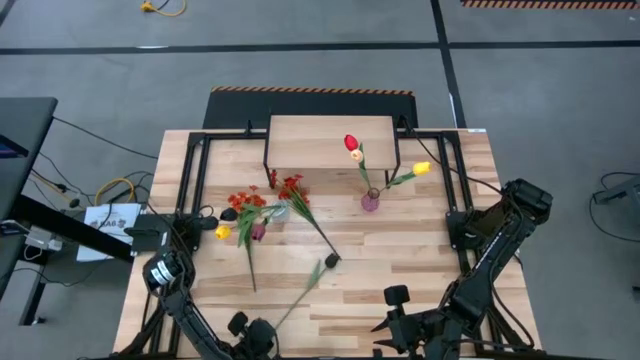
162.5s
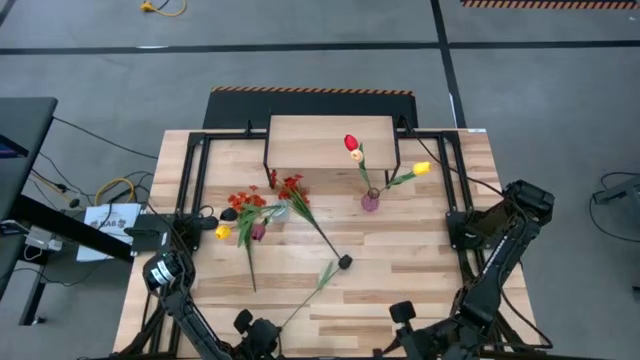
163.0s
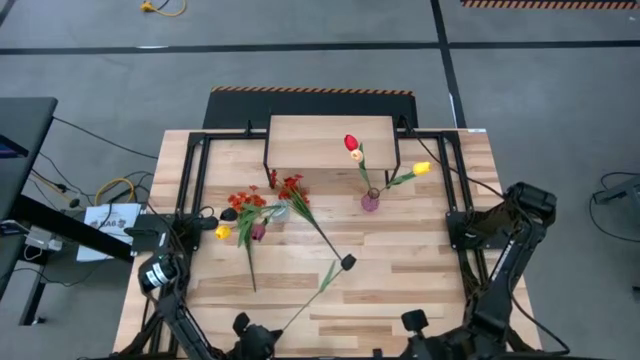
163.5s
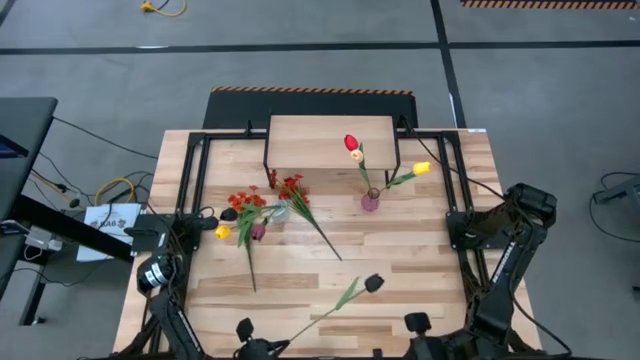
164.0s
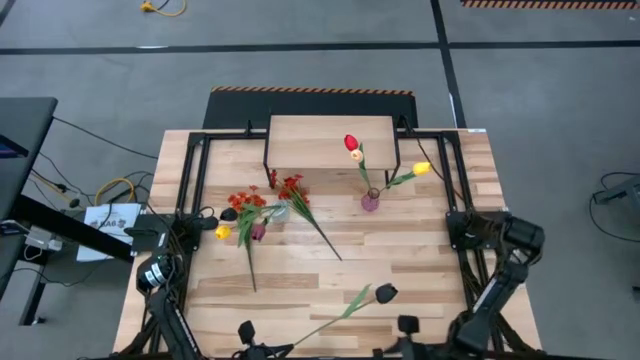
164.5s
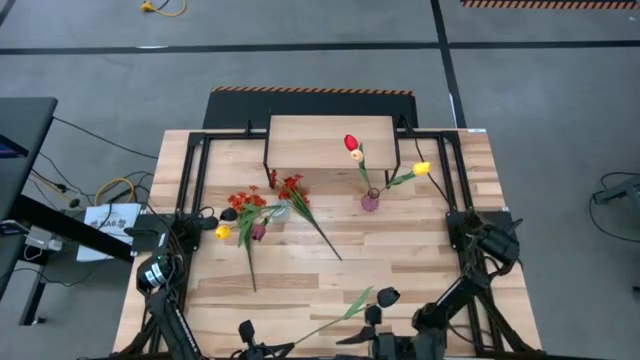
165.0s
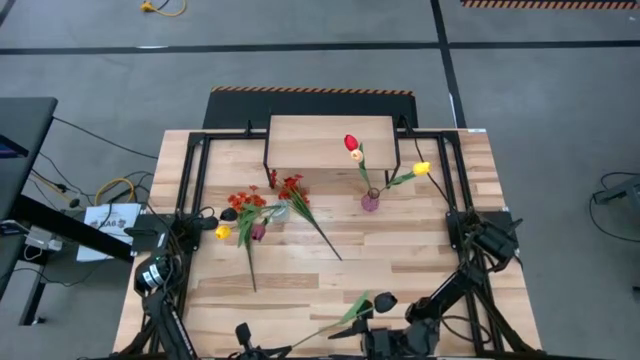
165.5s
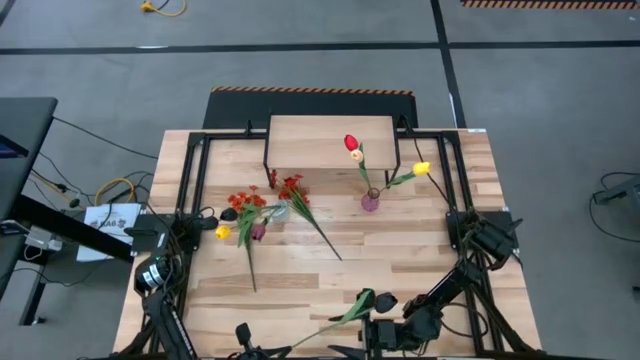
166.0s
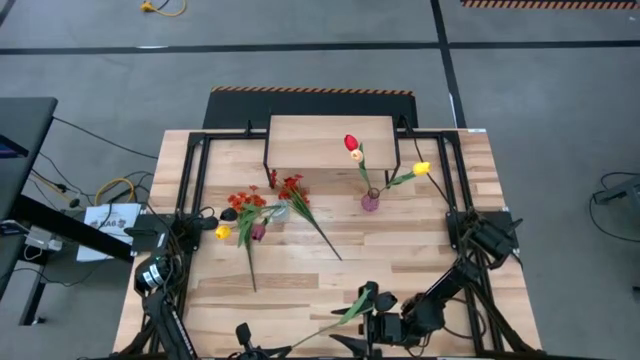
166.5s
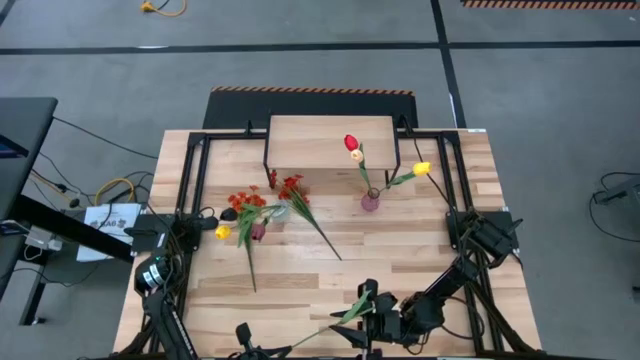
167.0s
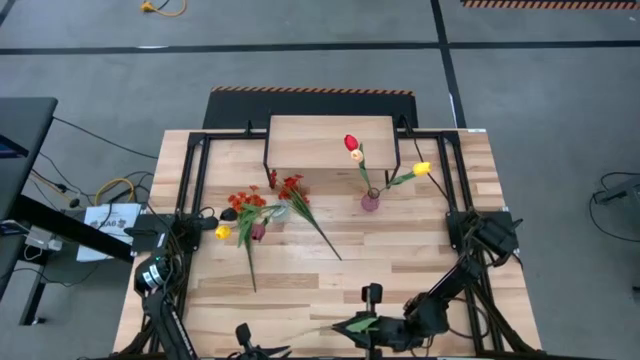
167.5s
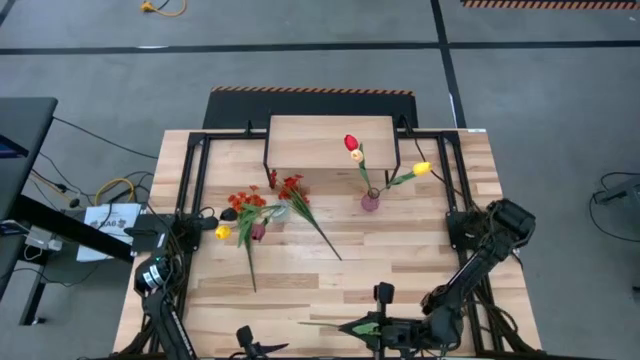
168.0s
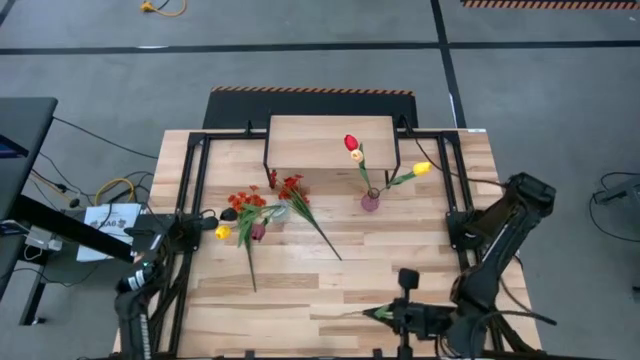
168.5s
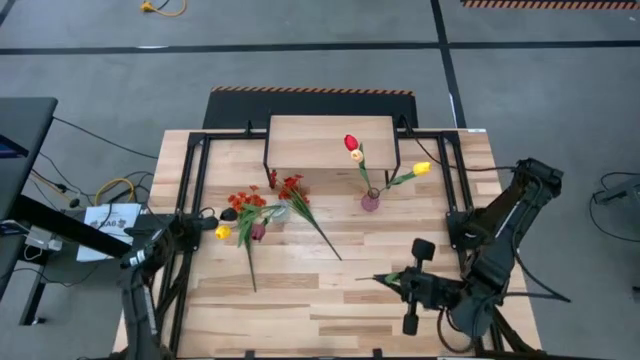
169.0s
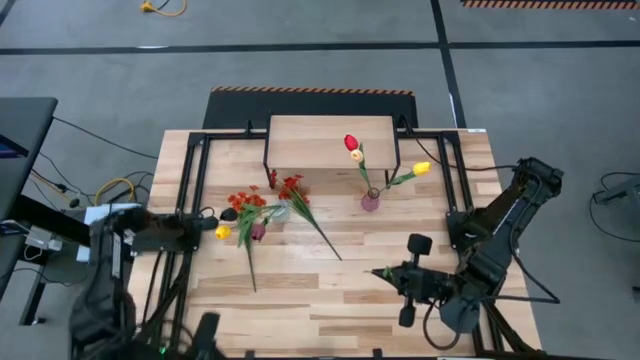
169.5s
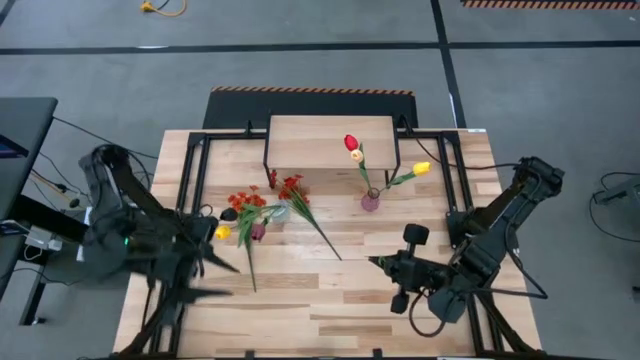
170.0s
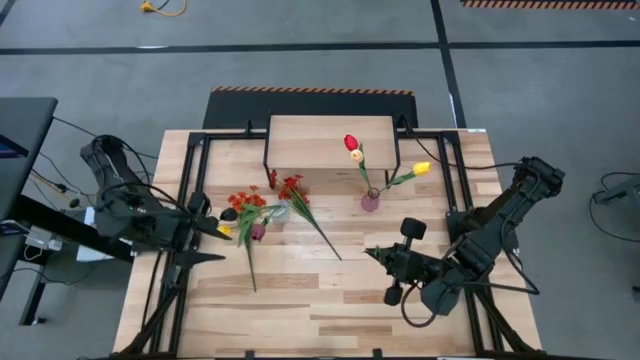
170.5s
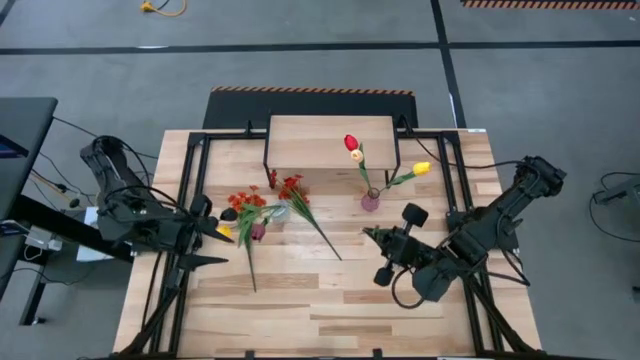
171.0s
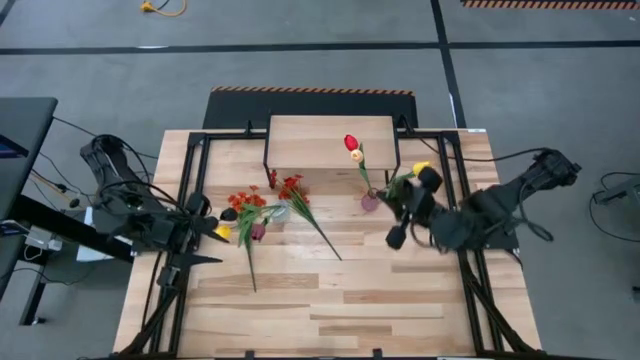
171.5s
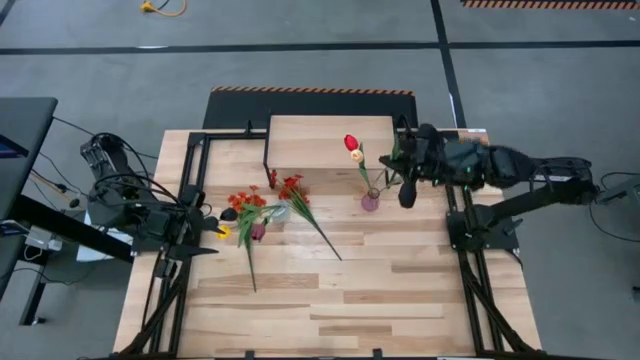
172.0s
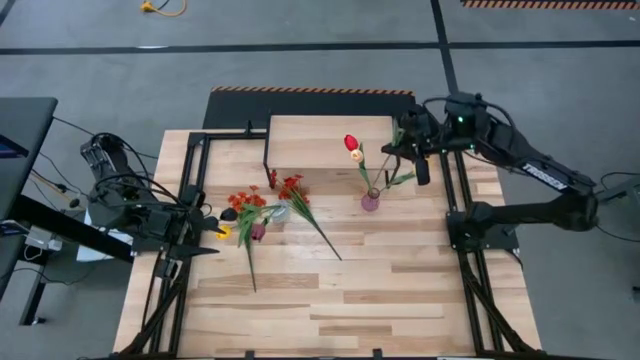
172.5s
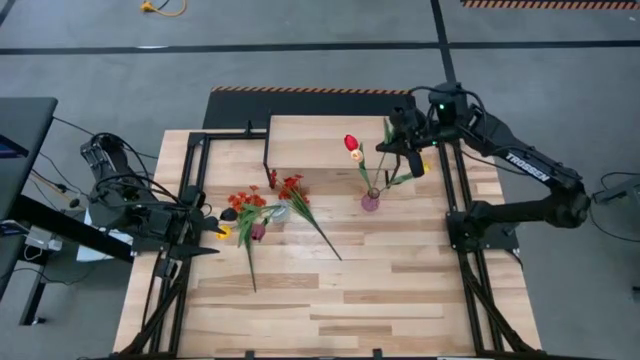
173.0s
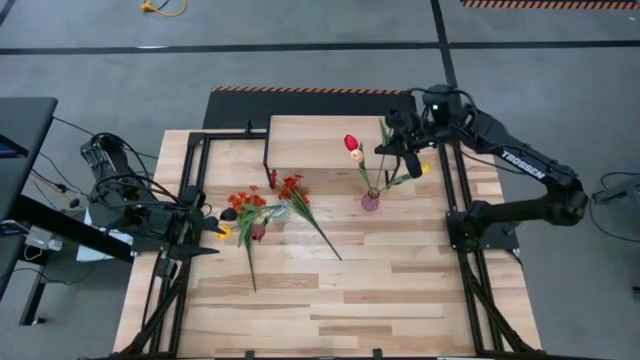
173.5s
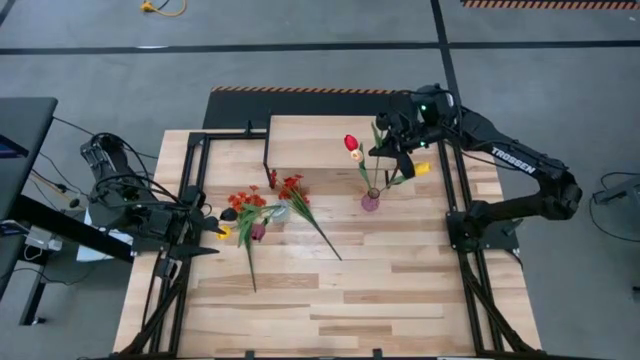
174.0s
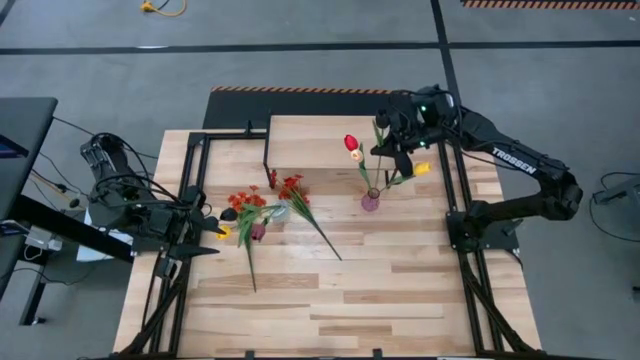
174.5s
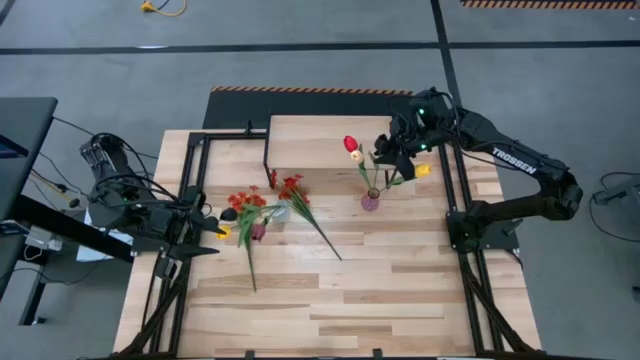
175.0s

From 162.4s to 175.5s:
Task: Pick and place flowers into a vace then onto a shelf
Put the black flower into the purple vase

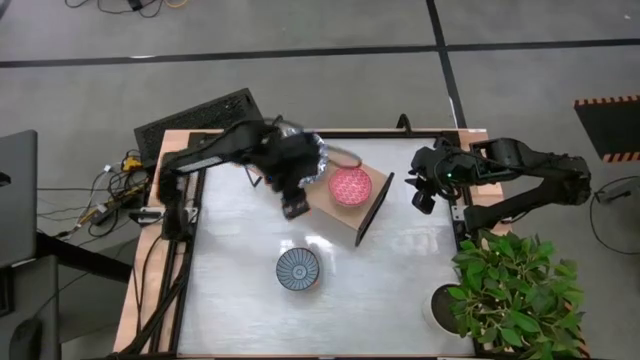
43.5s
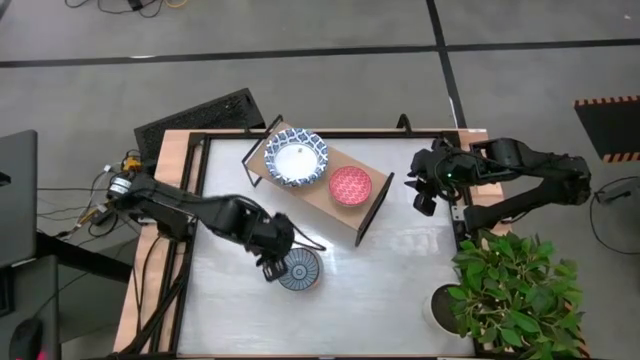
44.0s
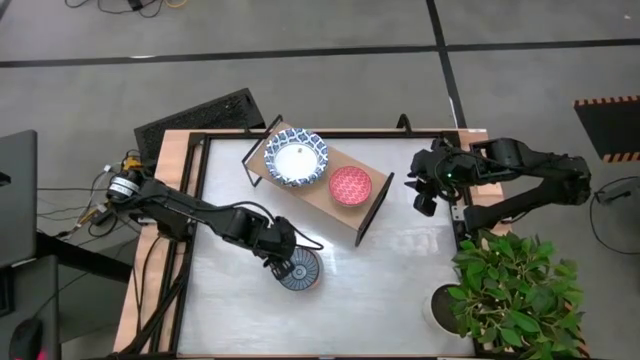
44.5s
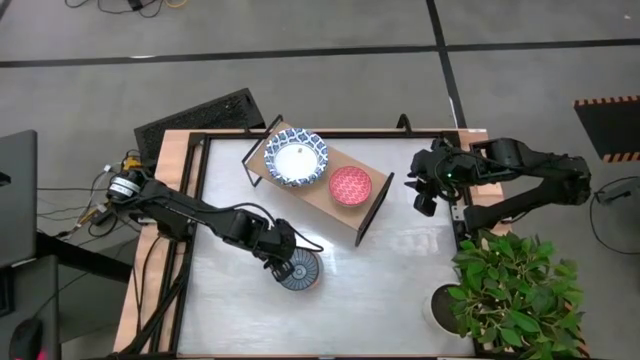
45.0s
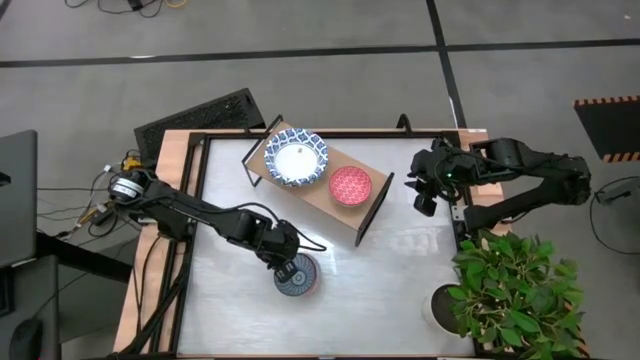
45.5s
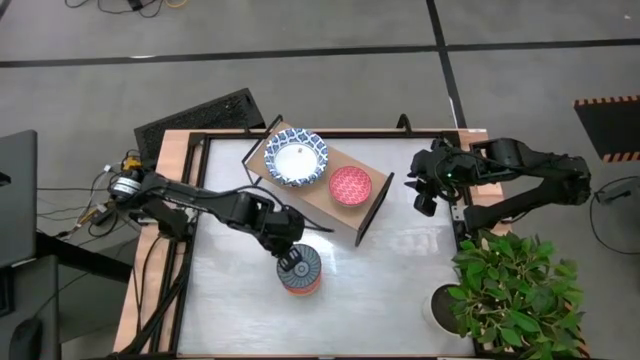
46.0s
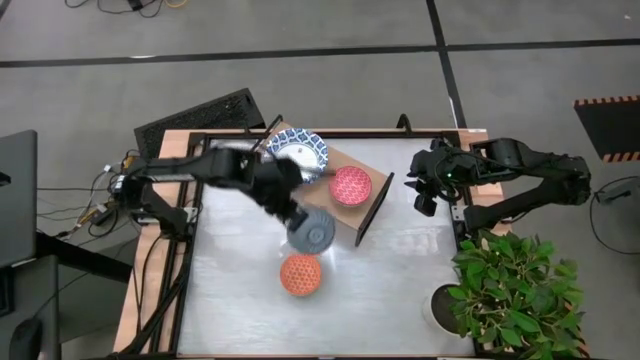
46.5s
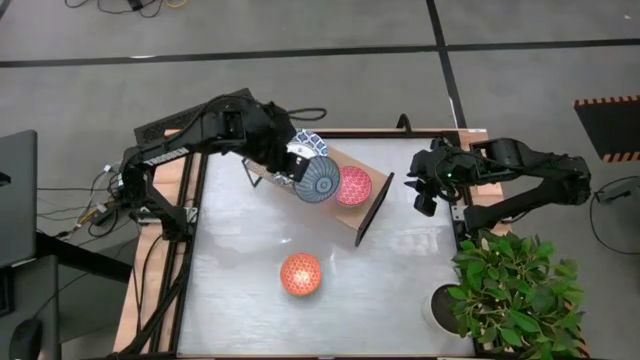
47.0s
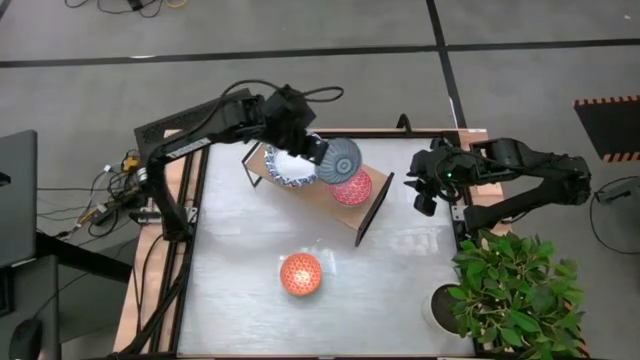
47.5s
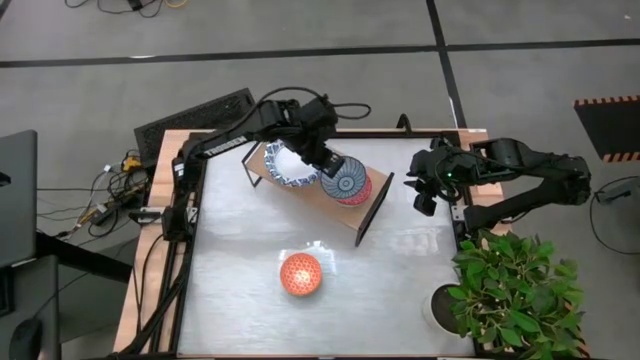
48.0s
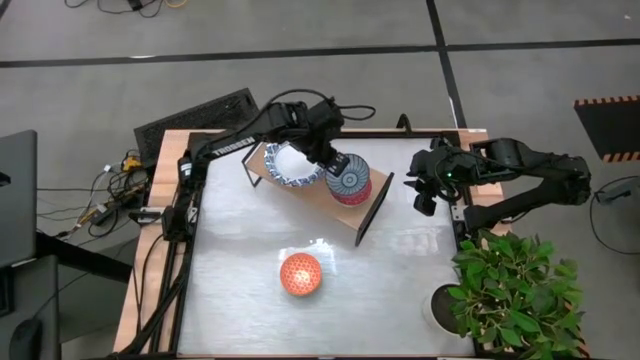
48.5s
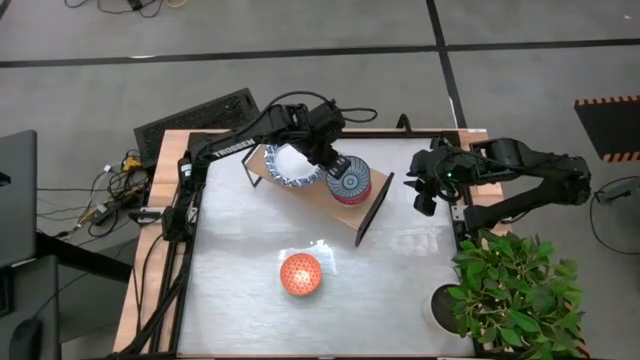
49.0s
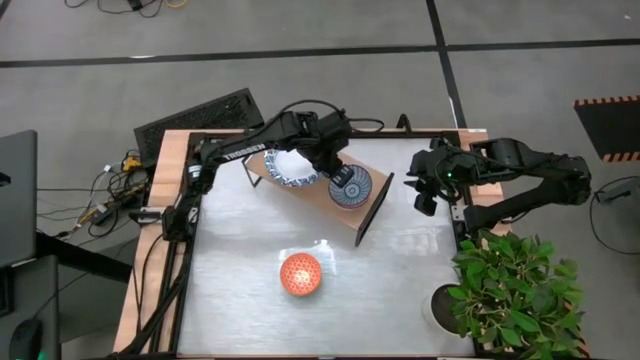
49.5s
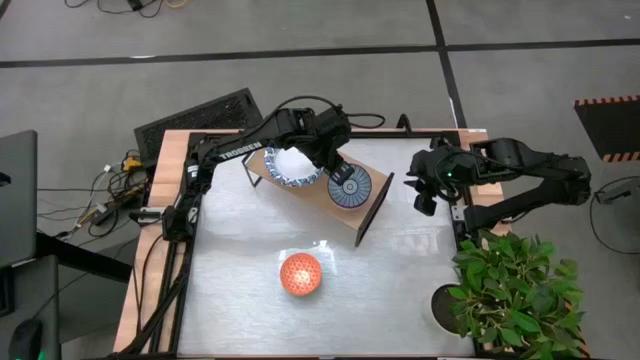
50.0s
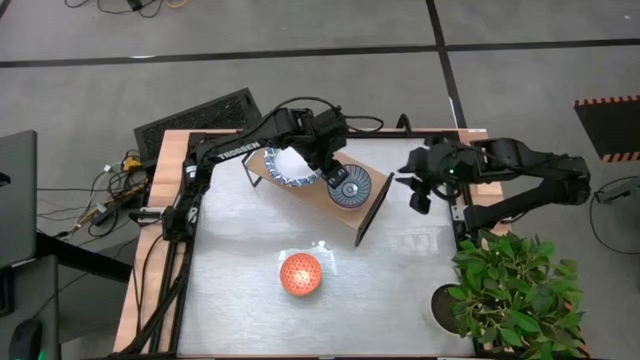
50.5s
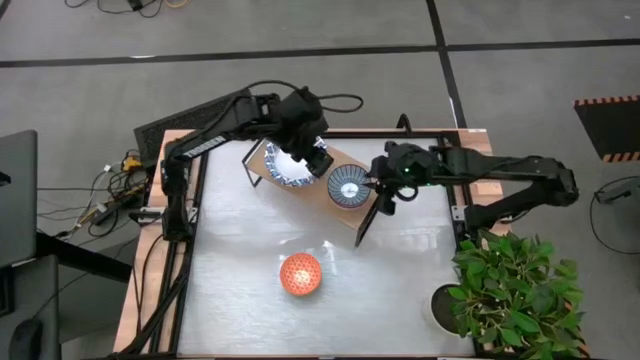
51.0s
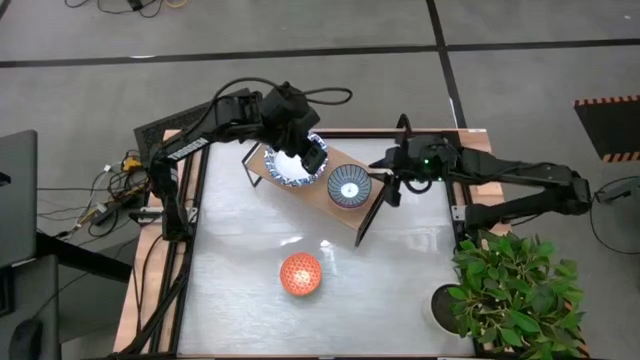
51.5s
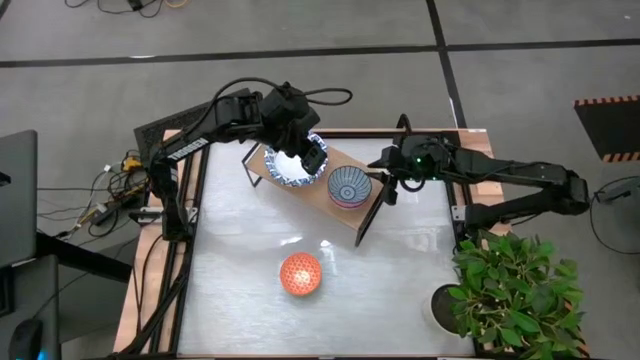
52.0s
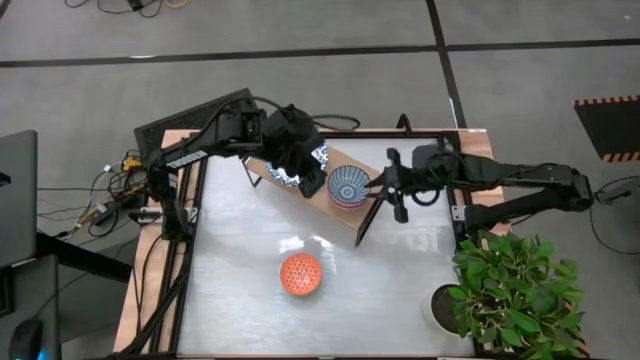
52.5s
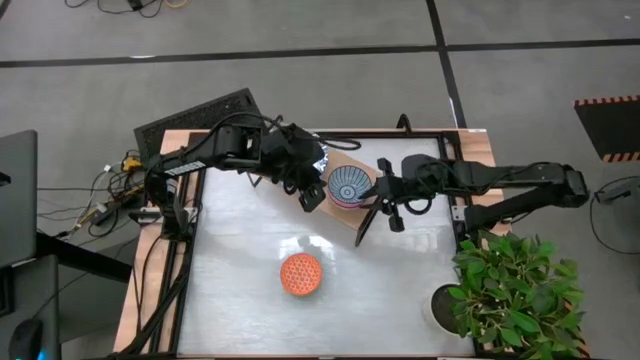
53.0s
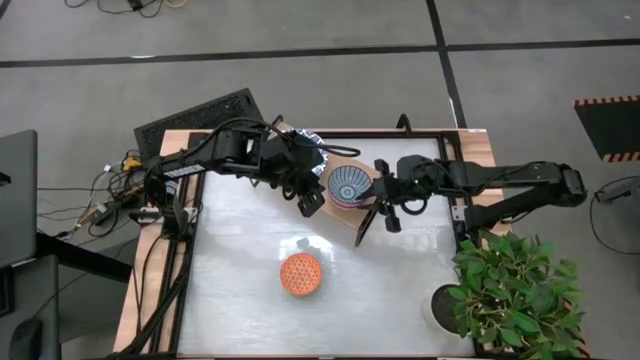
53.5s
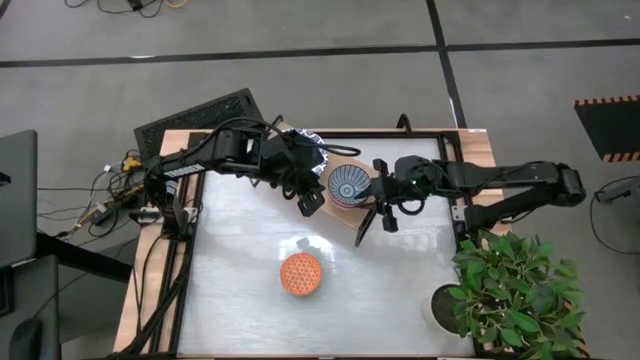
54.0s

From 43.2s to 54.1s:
Task: Place and stack bowls onto a shelf
Stack the blue bowl on top of the red bowl on the shelf
